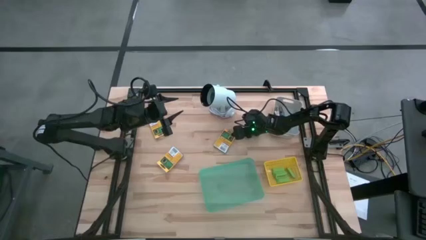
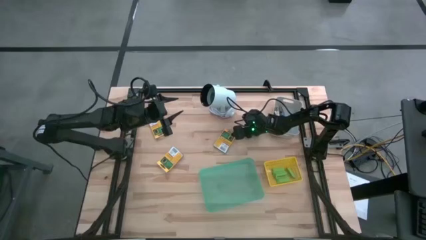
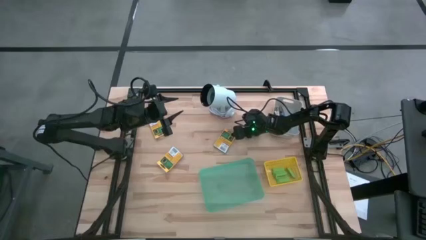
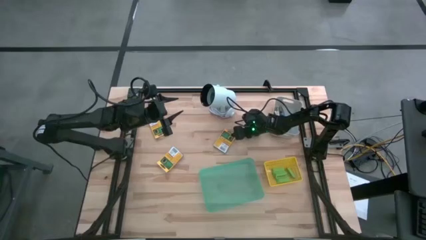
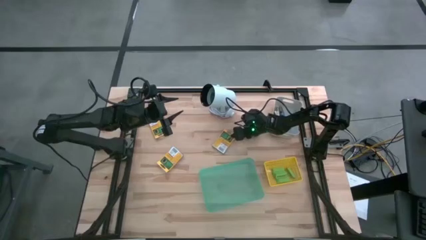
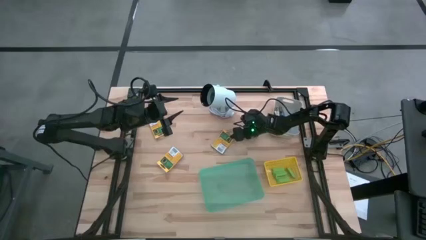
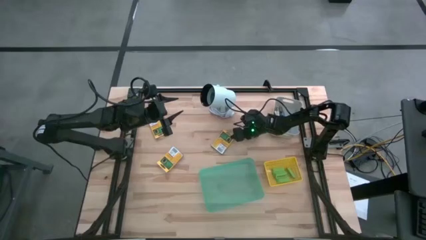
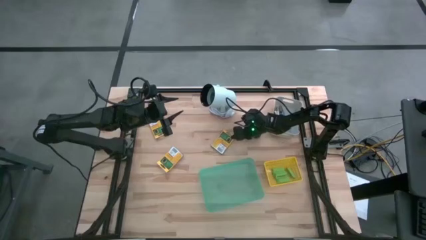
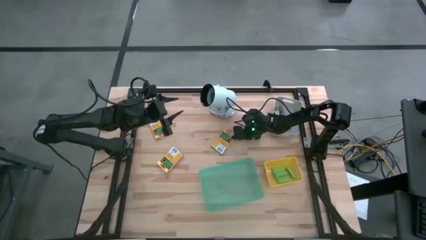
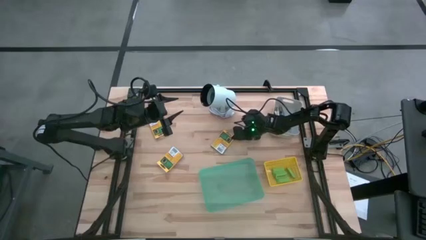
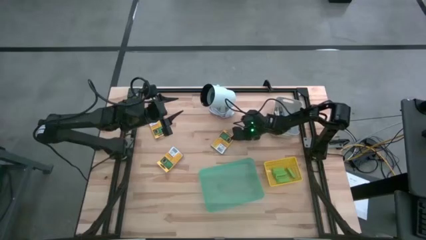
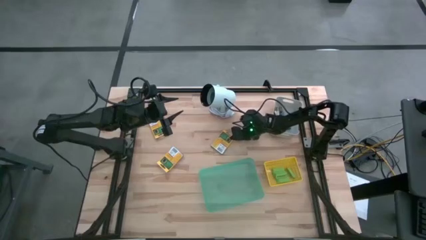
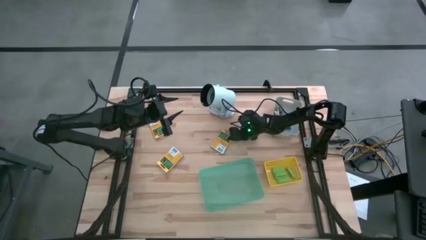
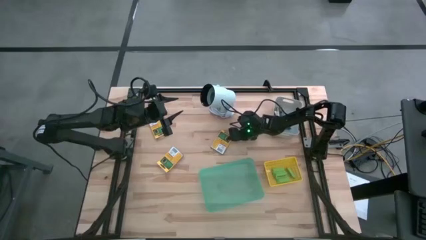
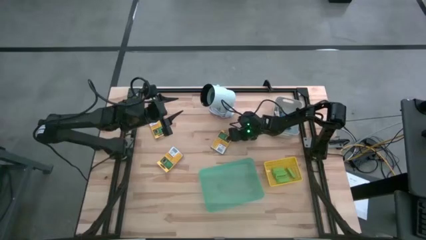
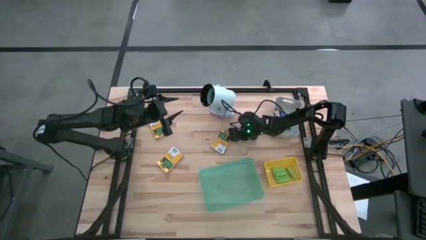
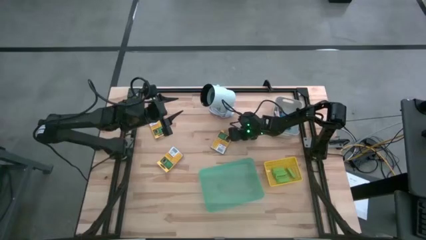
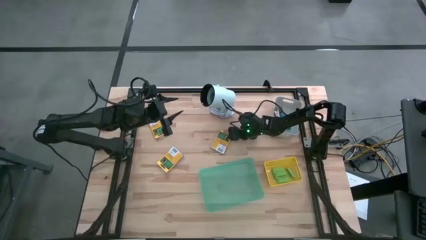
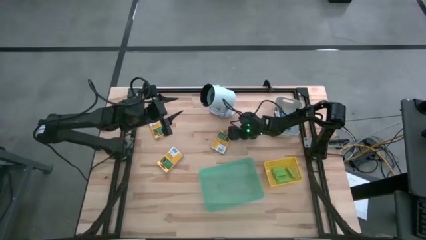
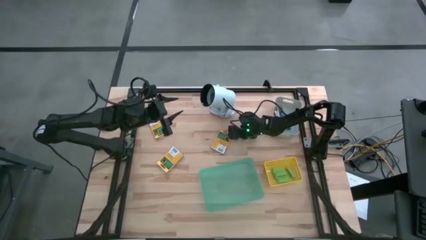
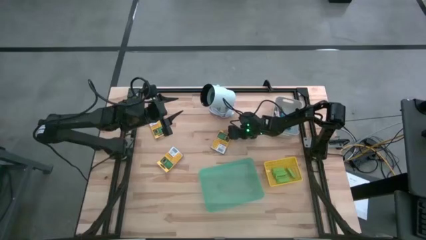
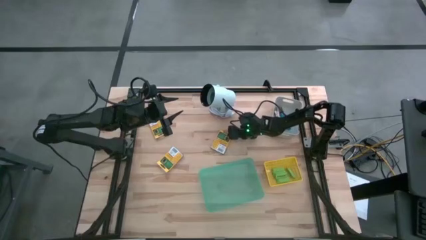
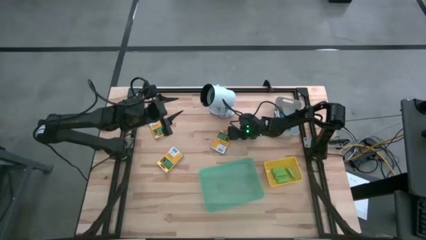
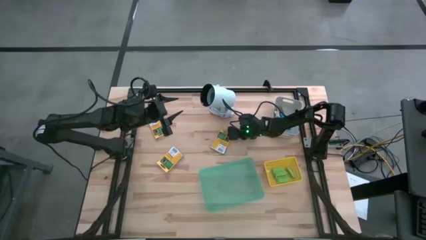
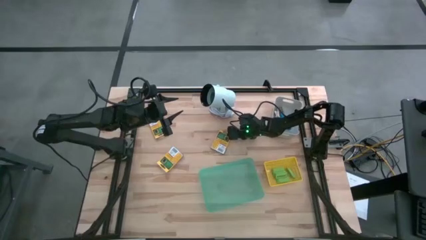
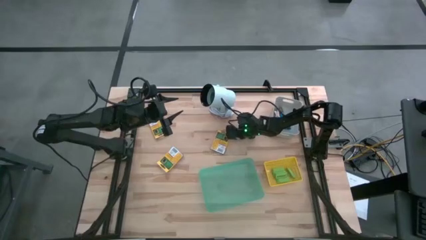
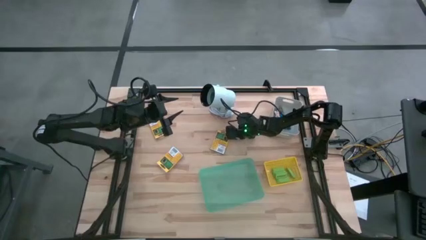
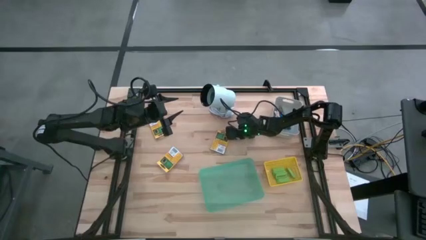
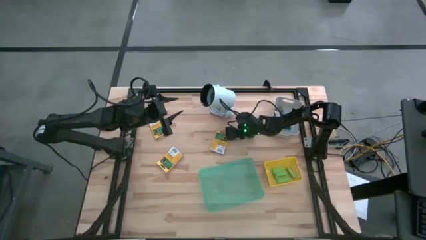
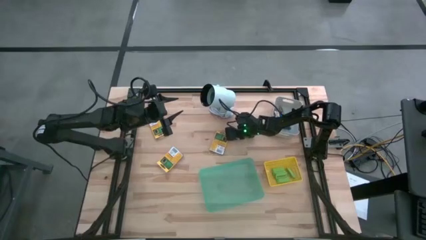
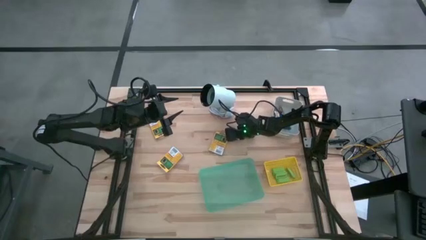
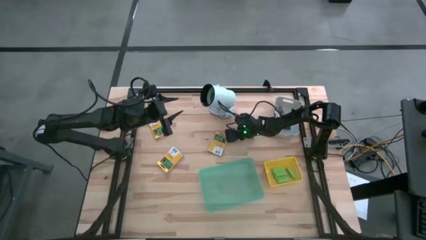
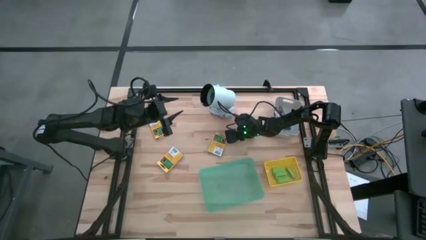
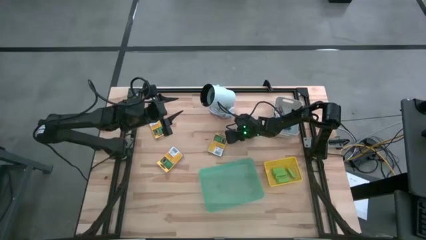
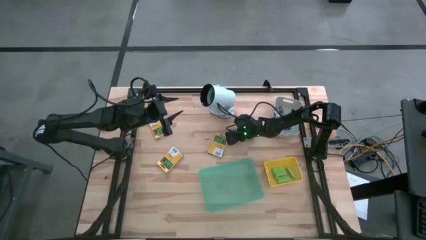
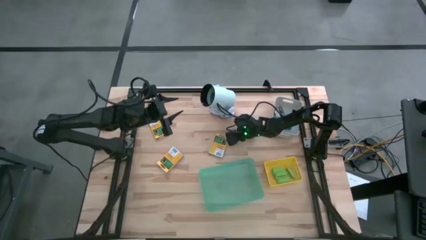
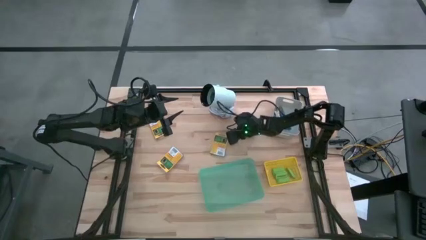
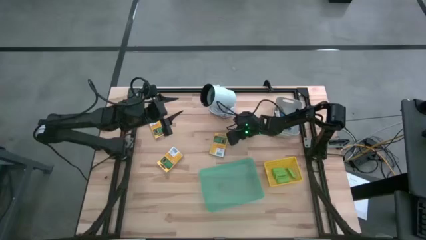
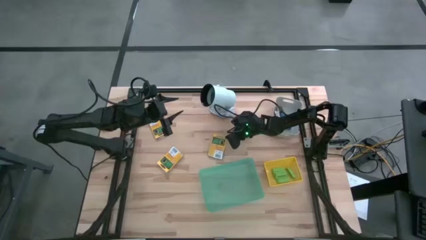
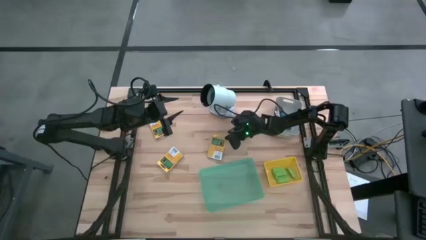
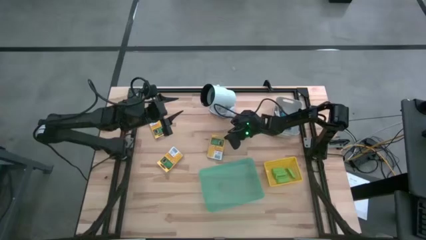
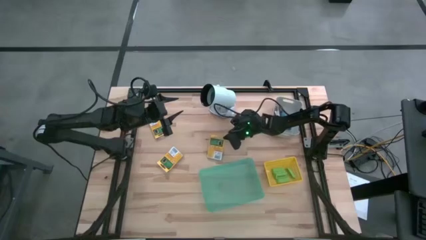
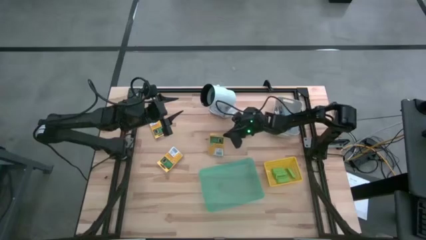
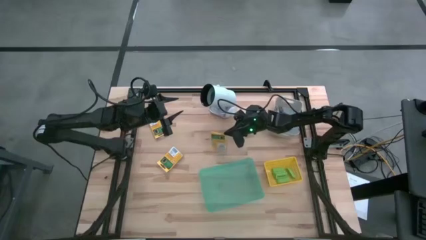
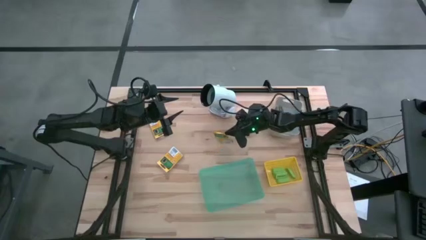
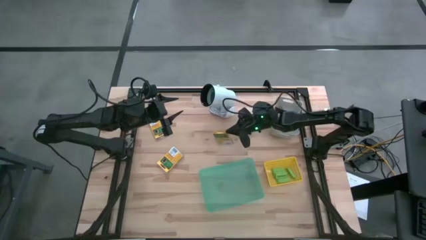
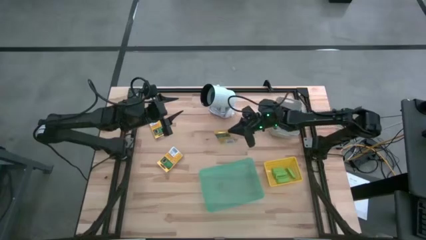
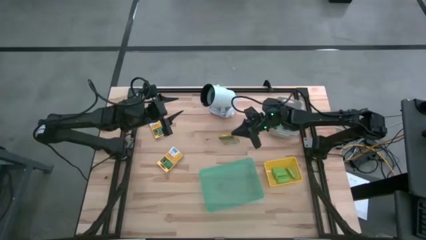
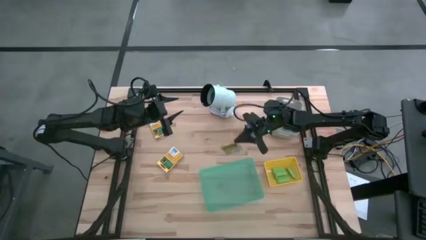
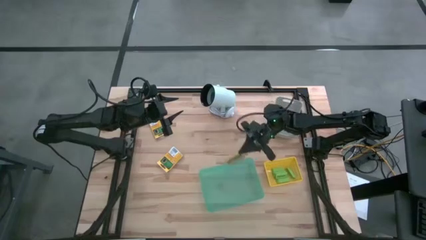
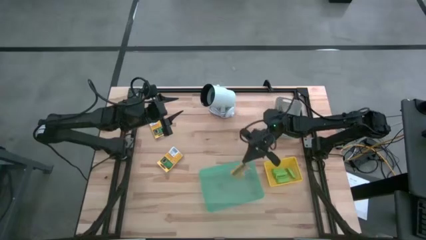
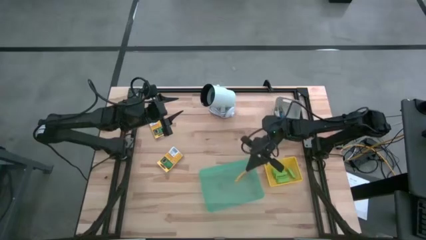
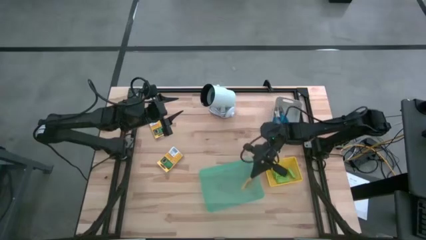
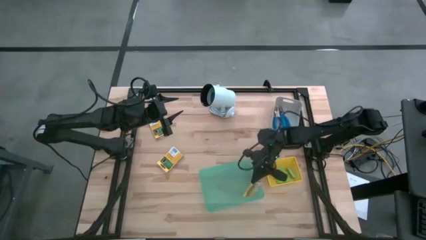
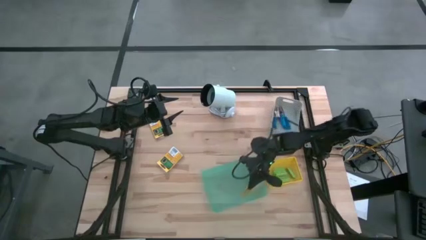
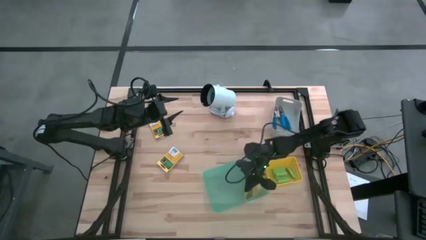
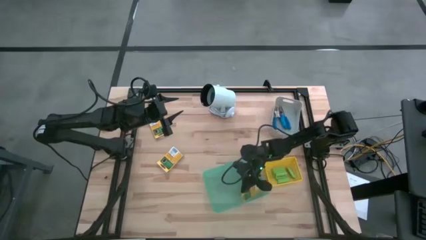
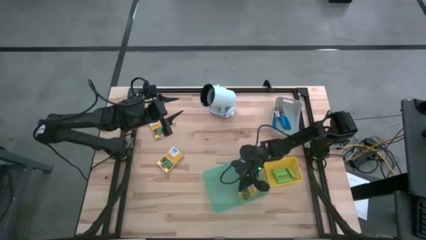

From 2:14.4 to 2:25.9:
Task: Pick & Place School Supplies
Put the yellow crayon box into the green bin
